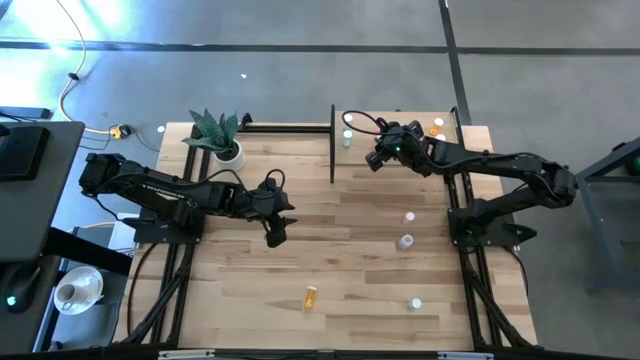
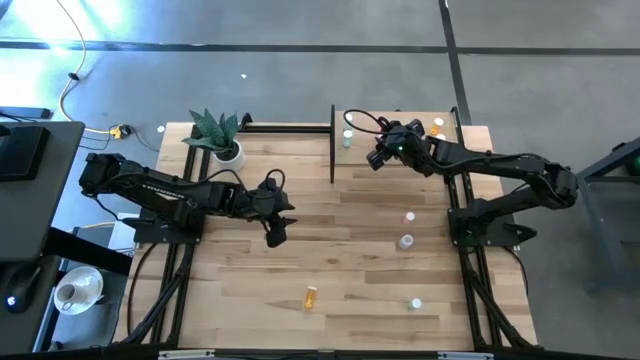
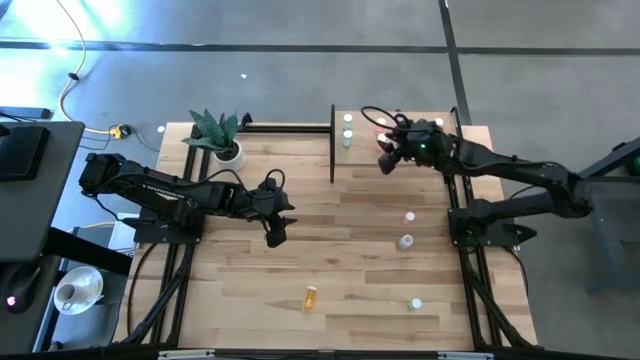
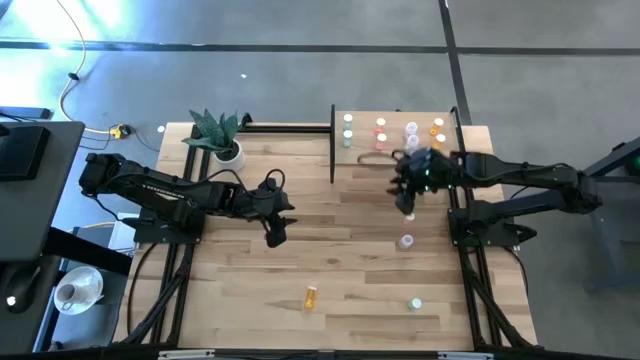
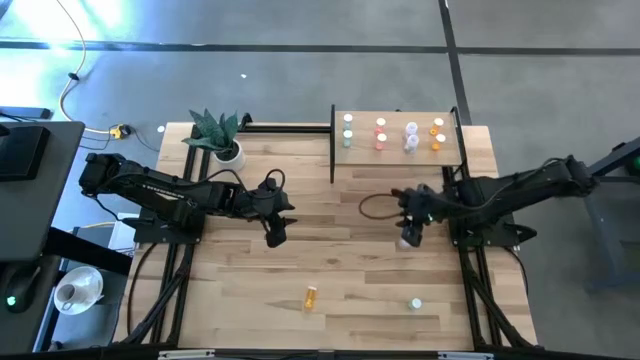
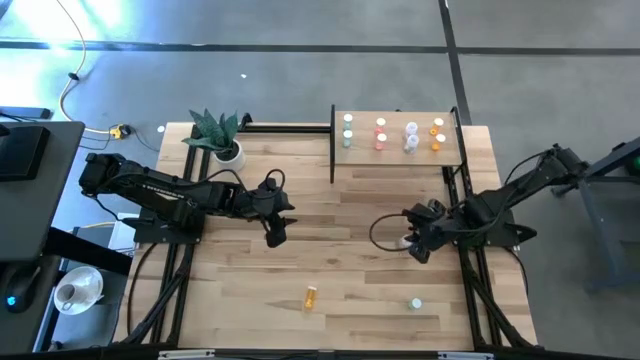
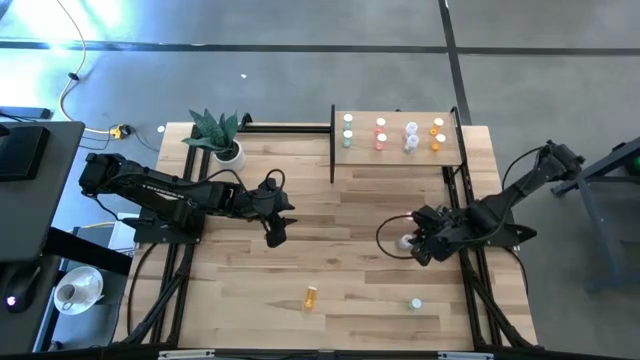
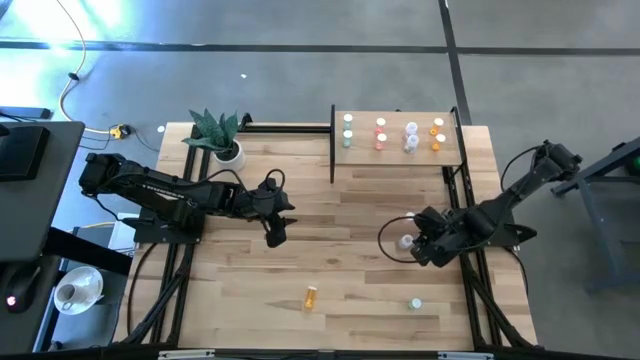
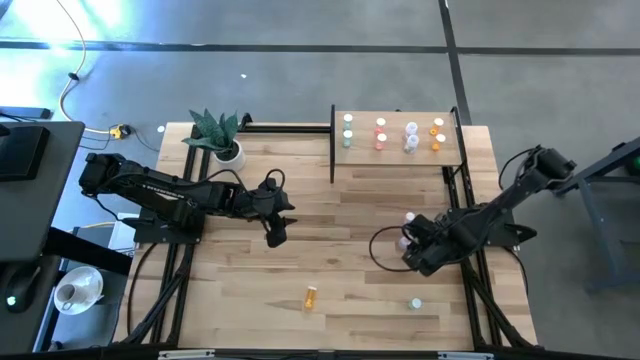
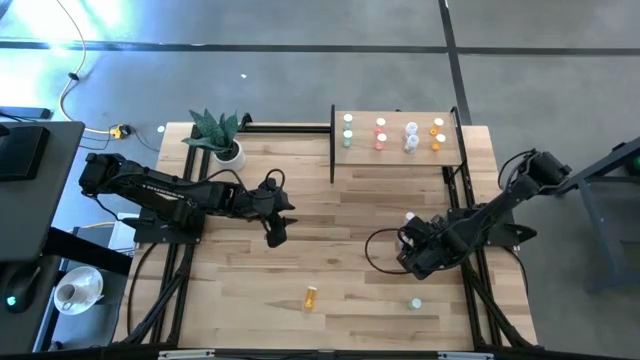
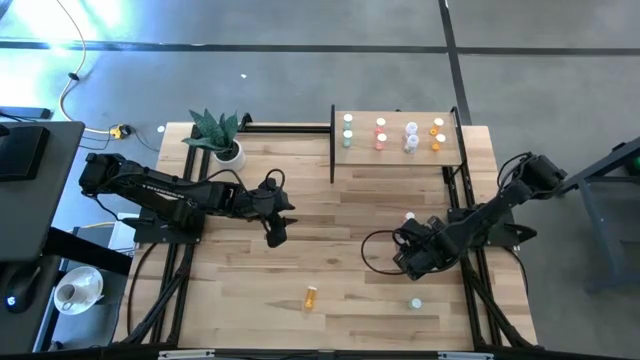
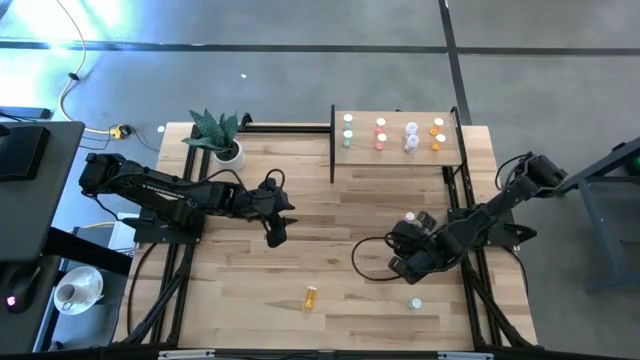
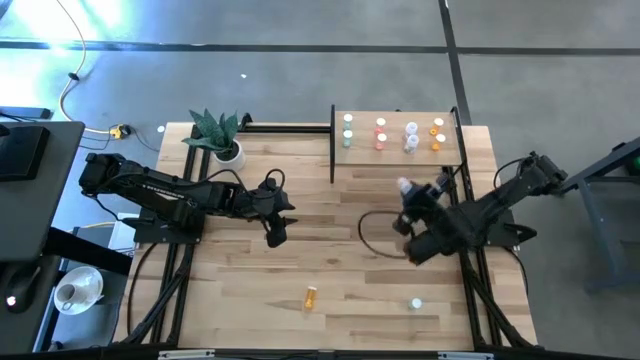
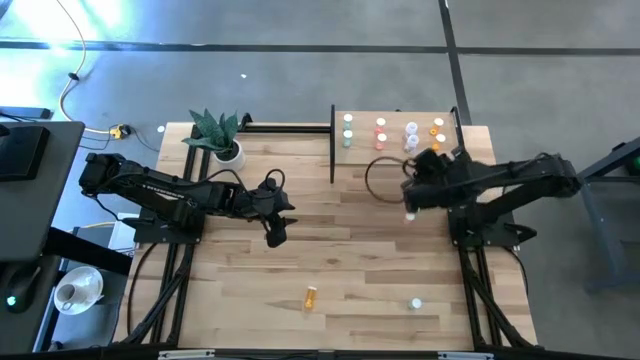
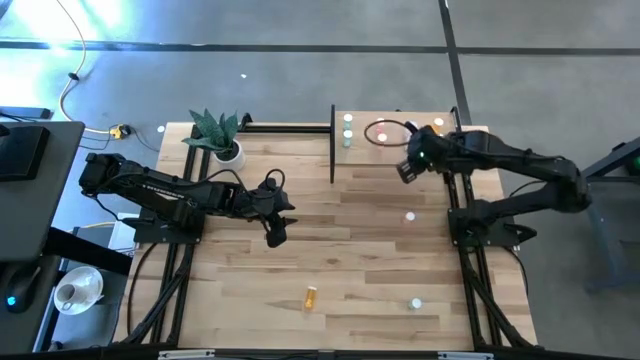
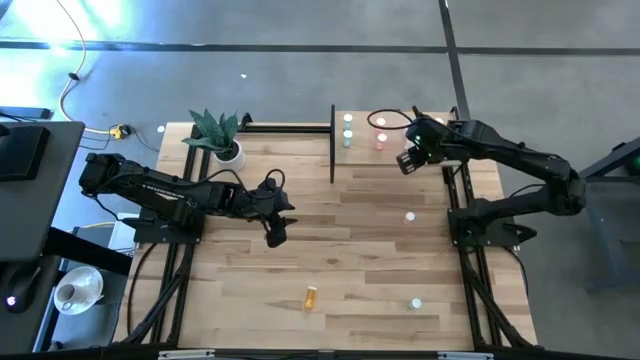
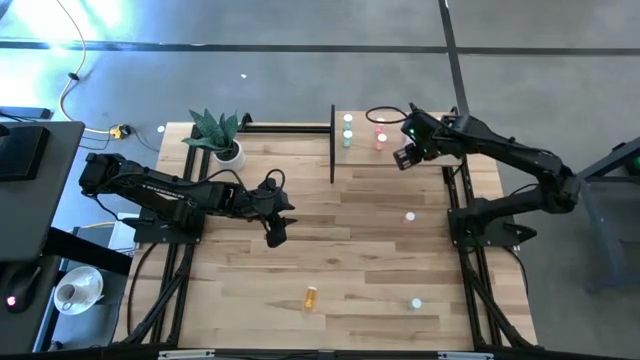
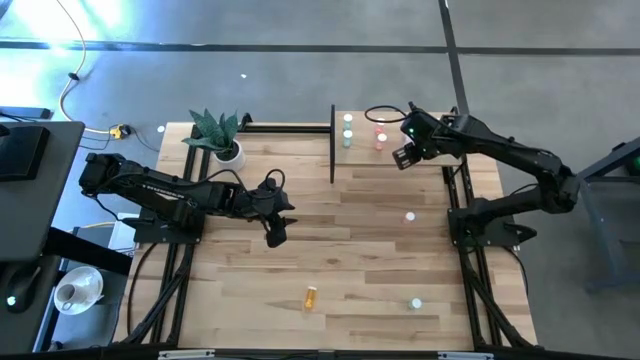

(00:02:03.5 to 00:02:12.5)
Task: Pick and place medicine bottles onto shelf by color
Put the transparent pill bottle on the shelf aligned with the other transparent pill bottle

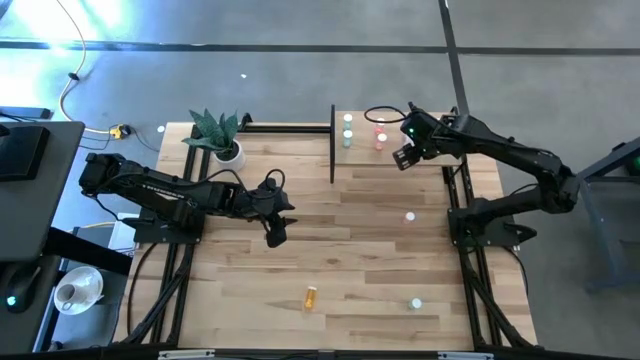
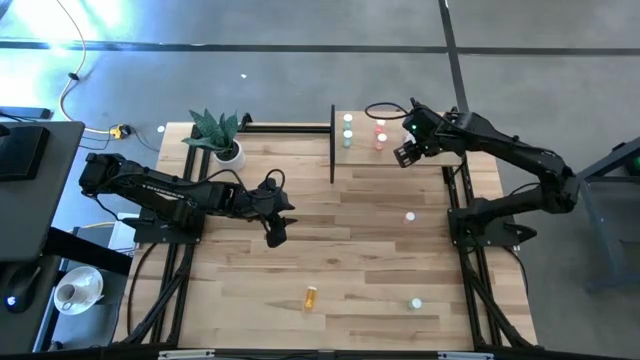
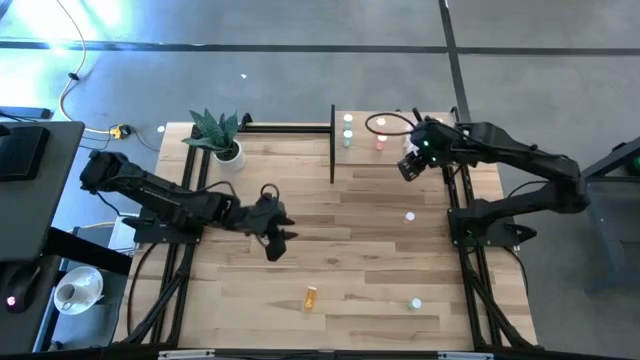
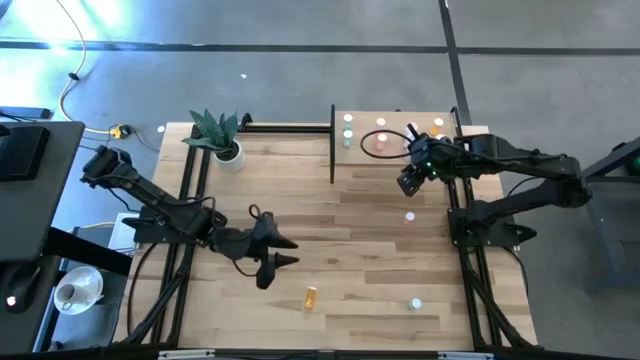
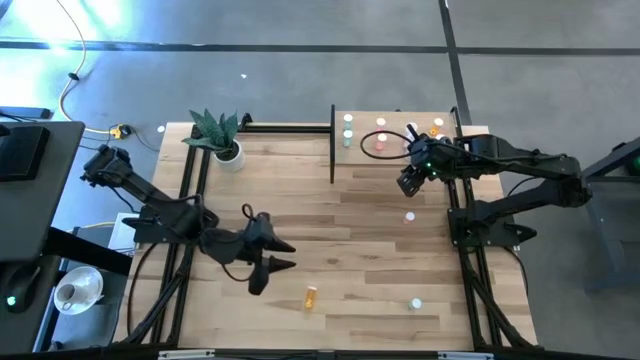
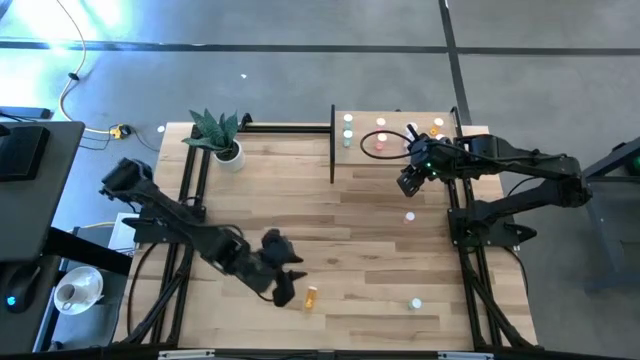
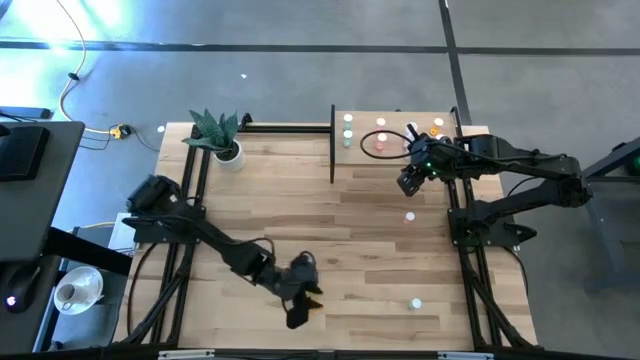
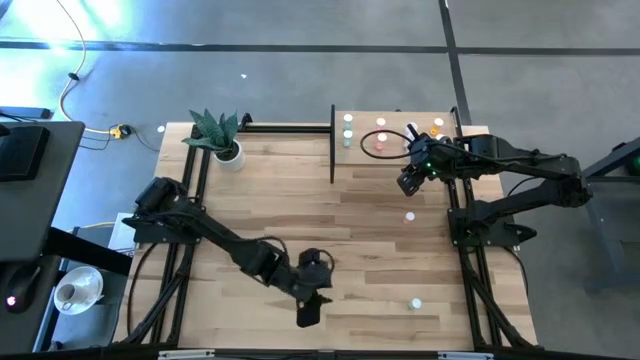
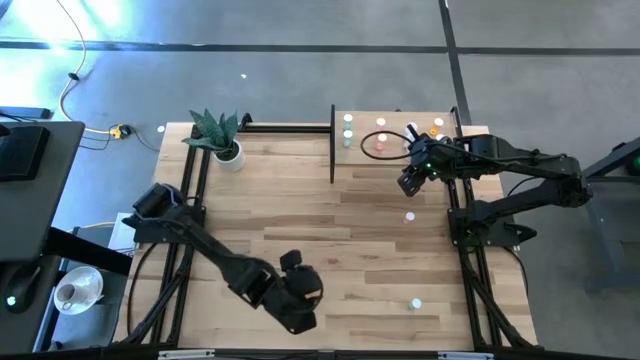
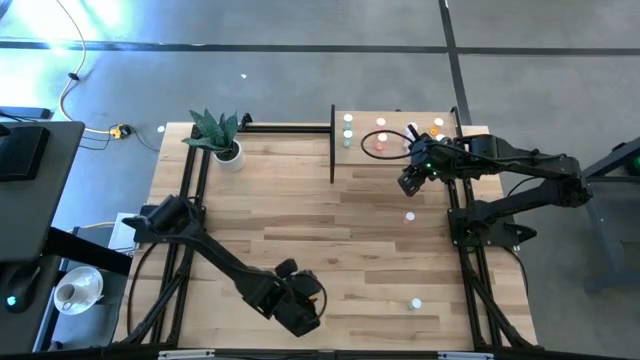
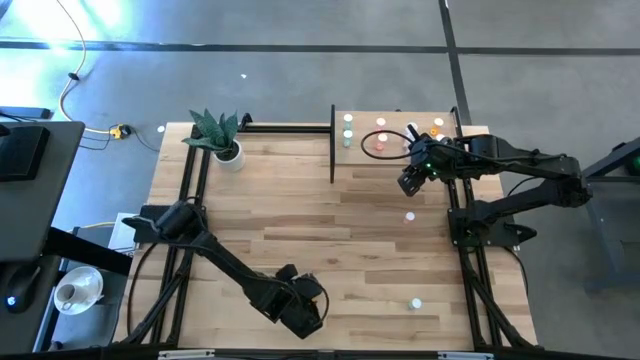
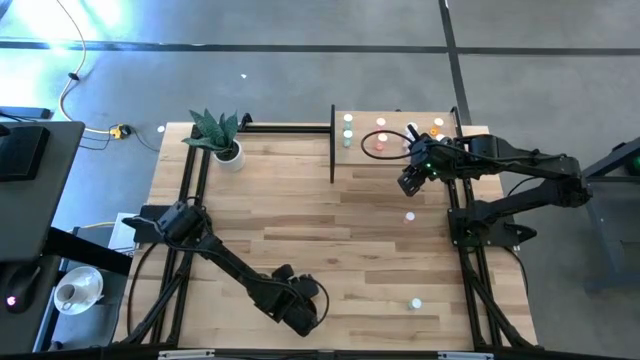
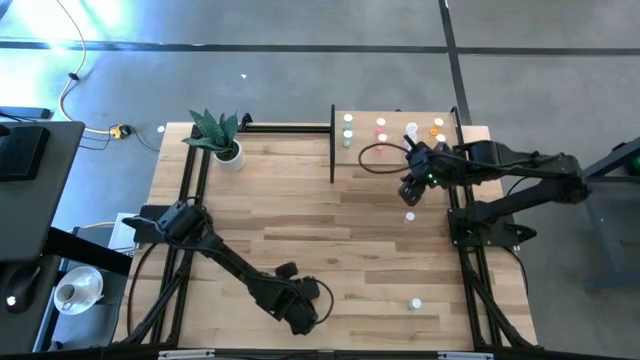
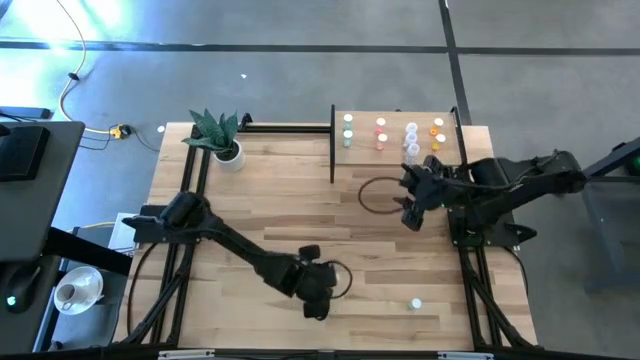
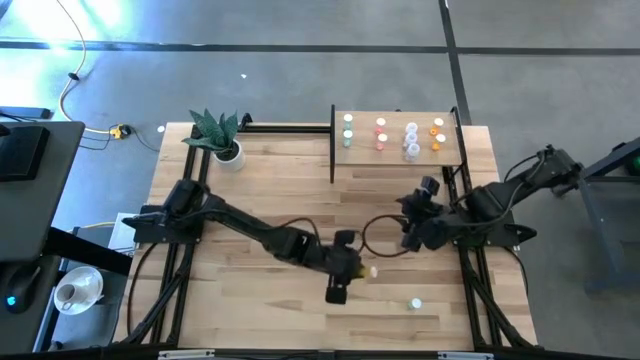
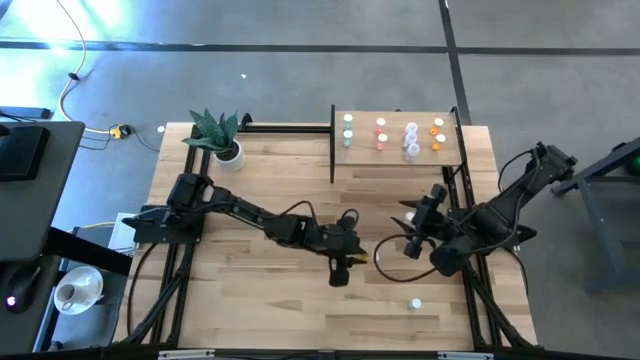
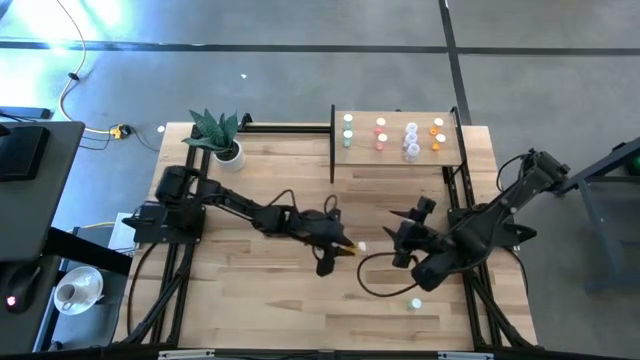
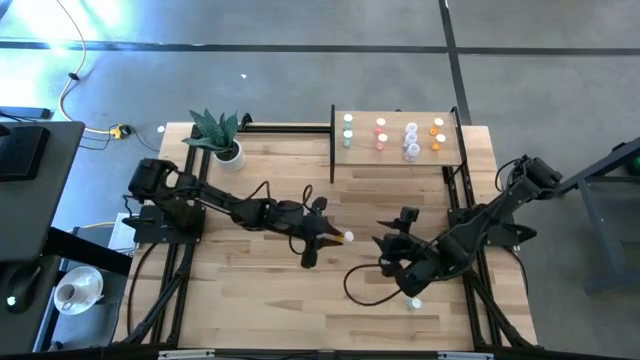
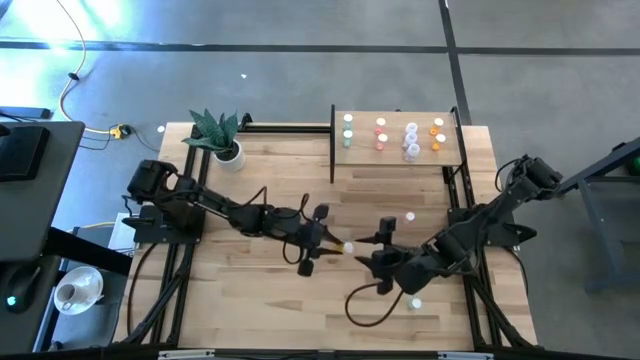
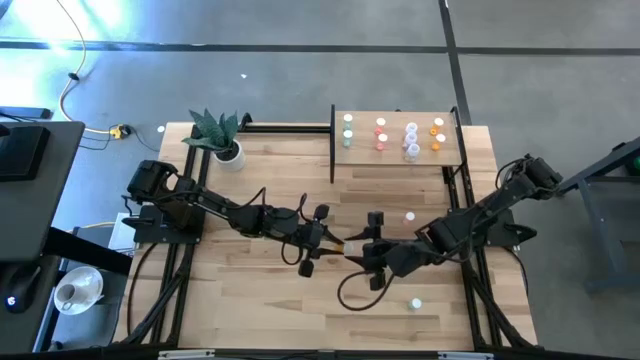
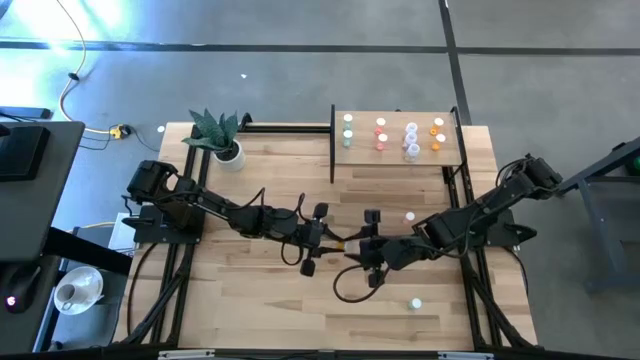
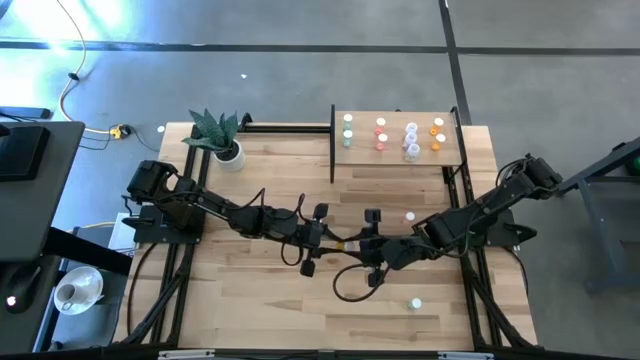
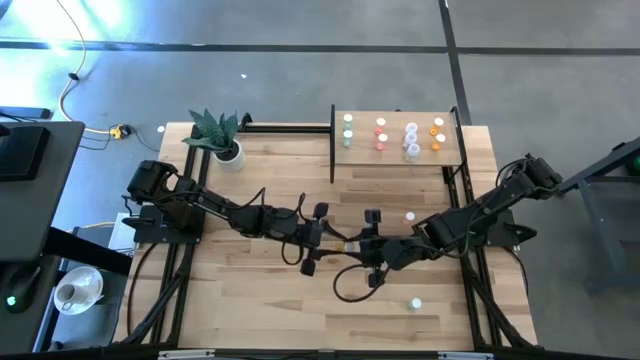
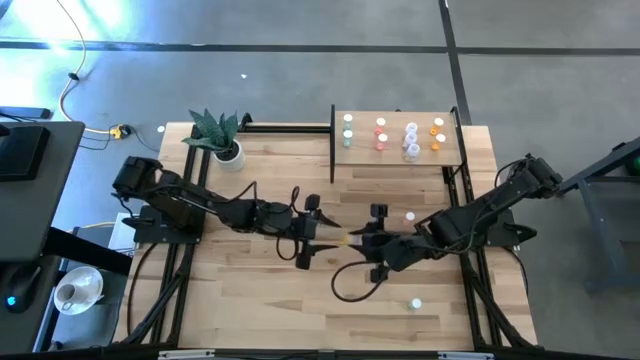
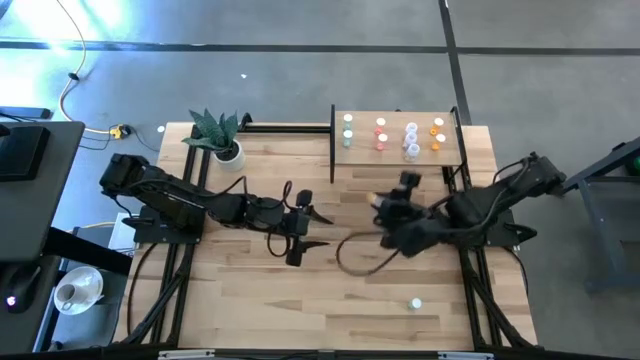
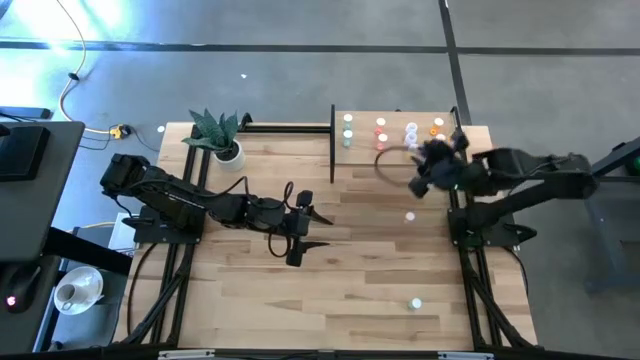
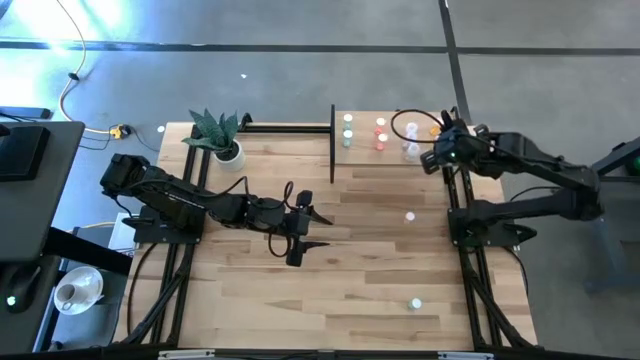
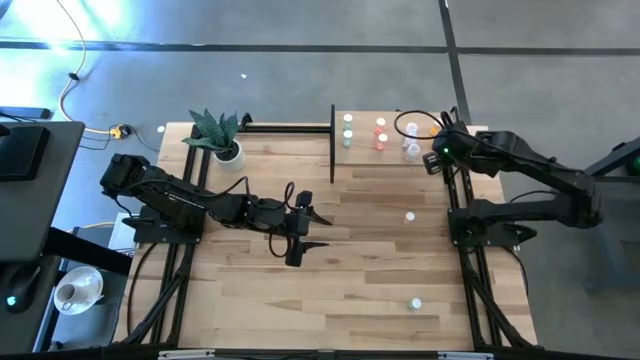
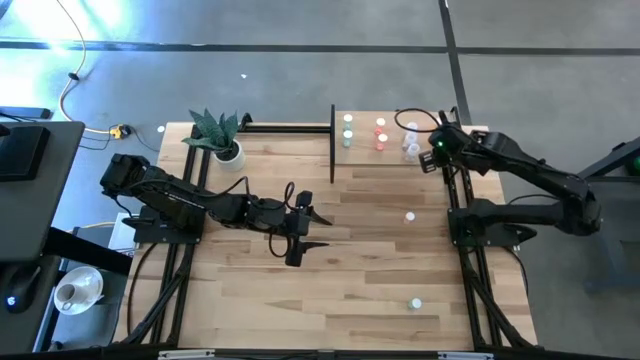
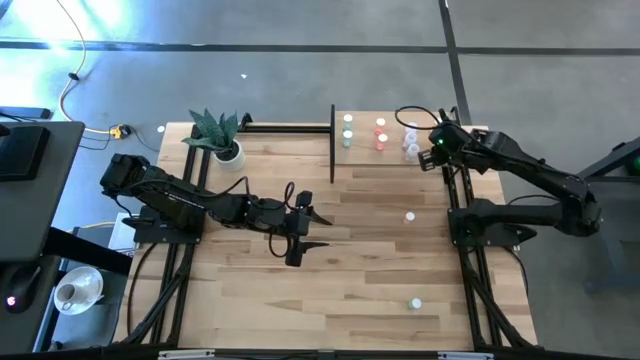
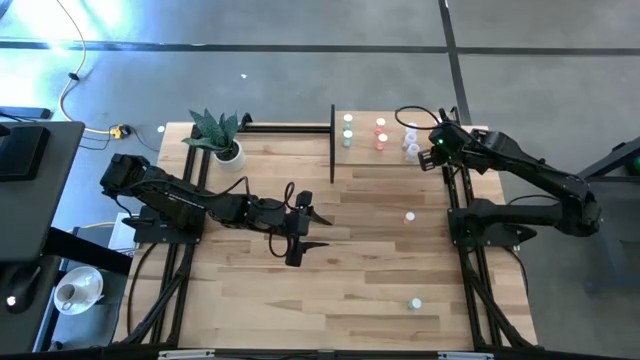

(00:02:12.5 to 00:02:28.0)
Put the yellow pill bottle on the shelf aligned with the other yellow pill bottle
